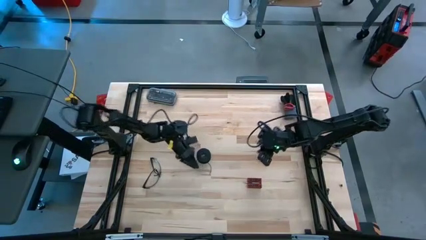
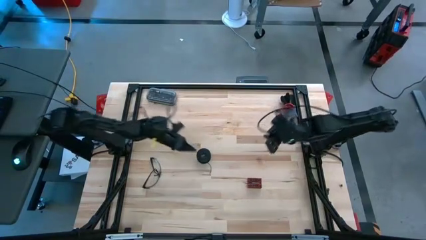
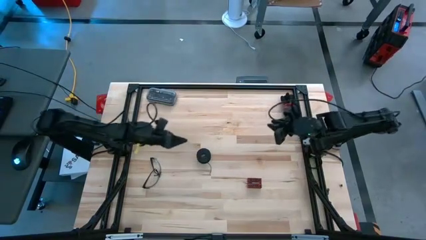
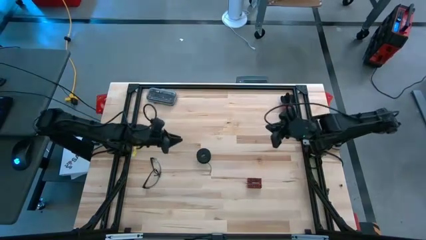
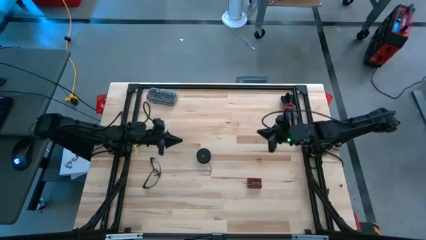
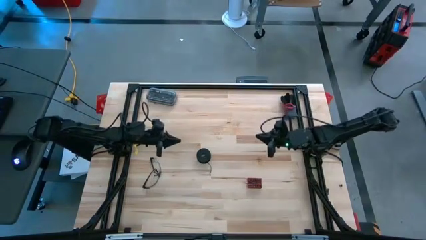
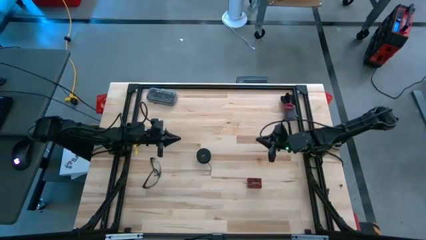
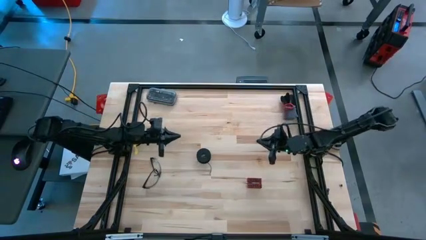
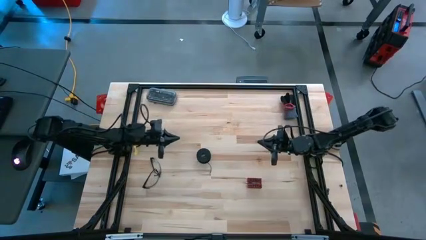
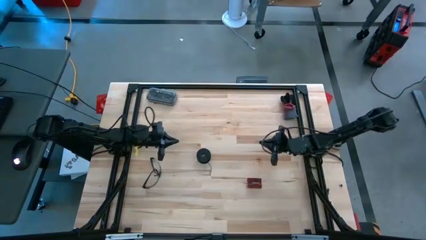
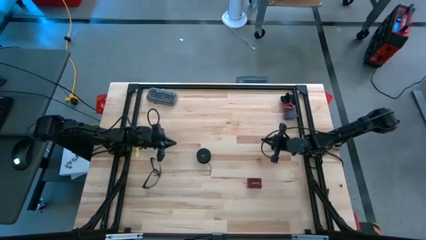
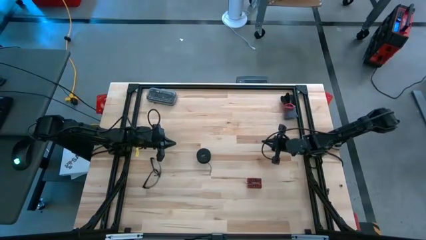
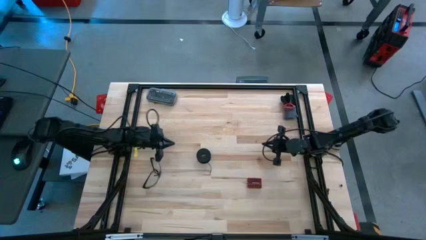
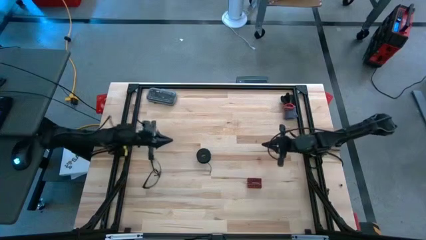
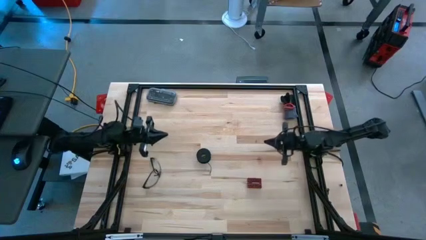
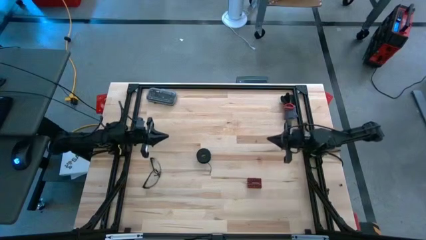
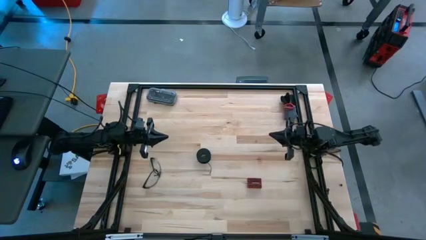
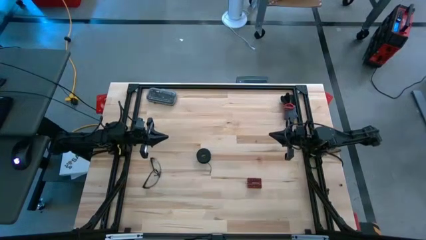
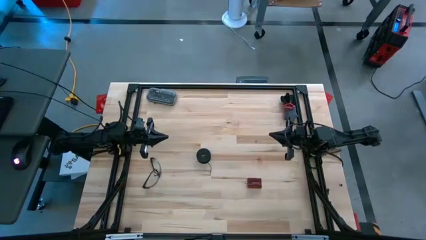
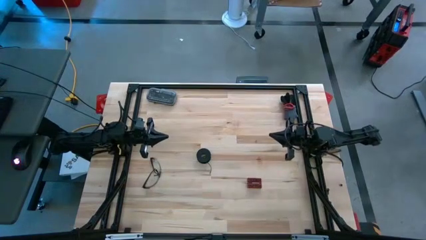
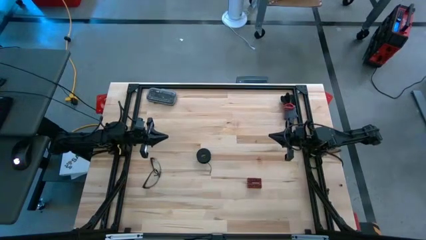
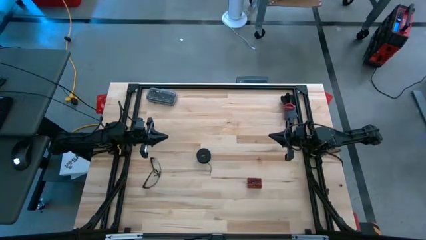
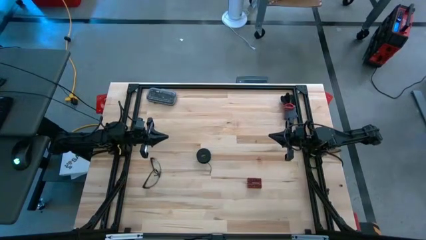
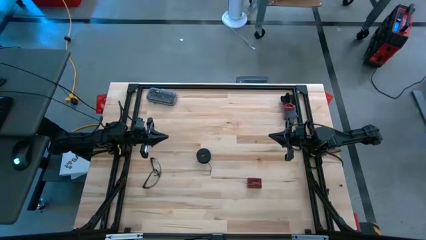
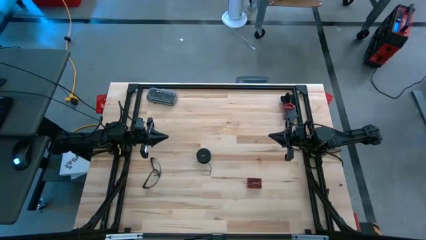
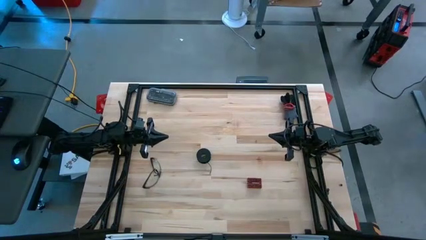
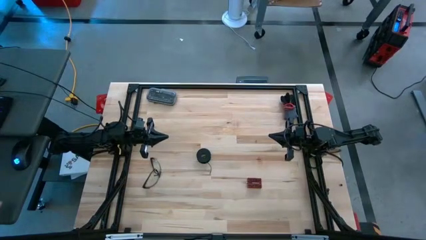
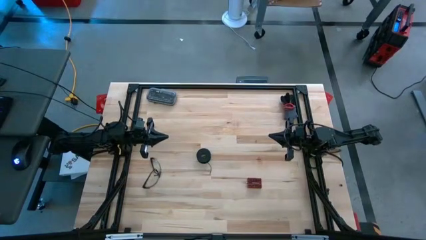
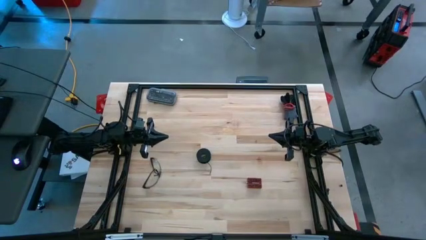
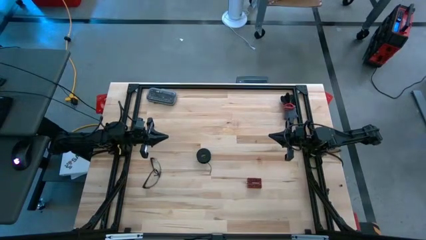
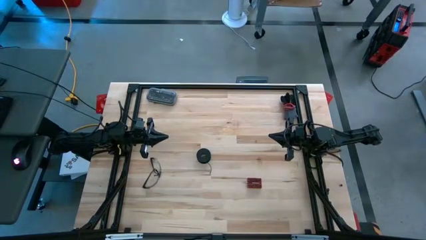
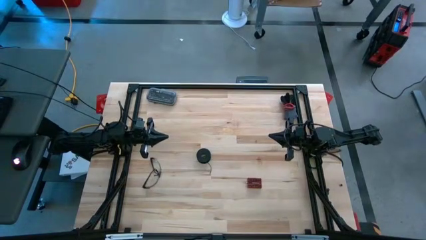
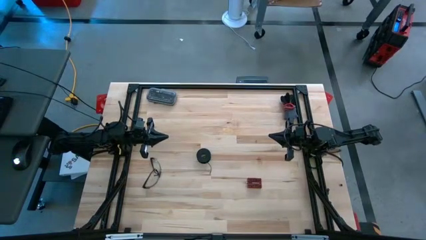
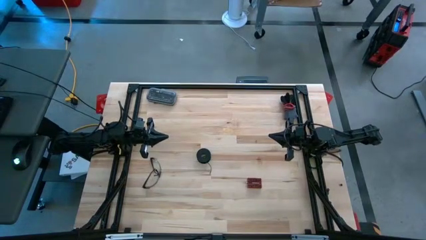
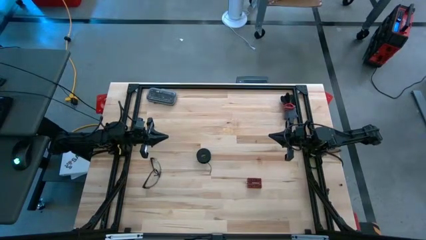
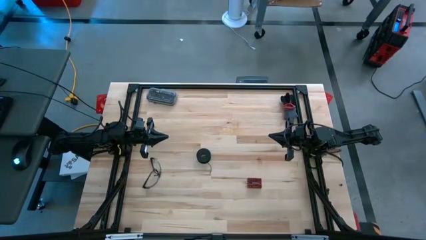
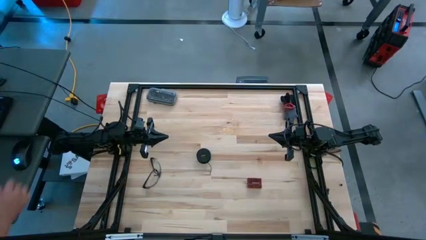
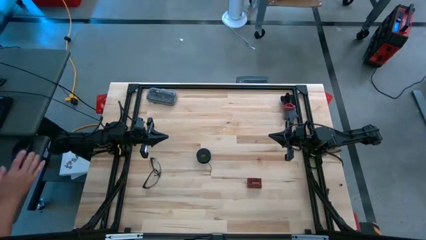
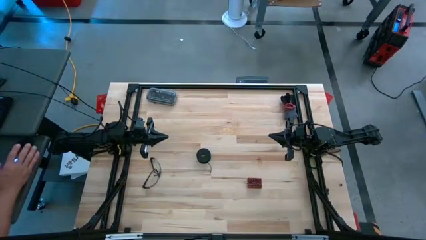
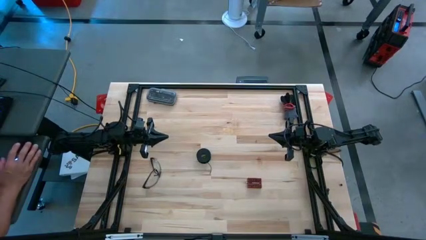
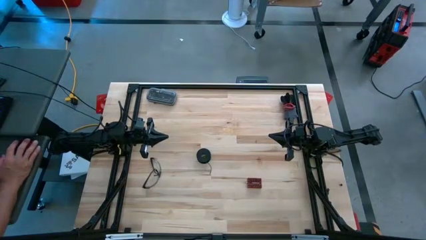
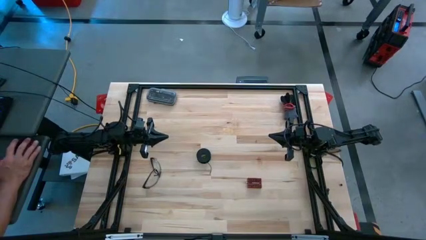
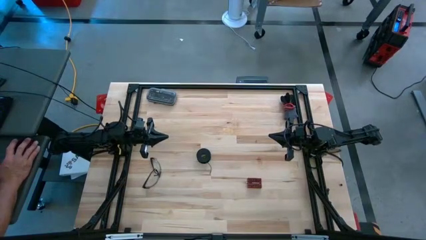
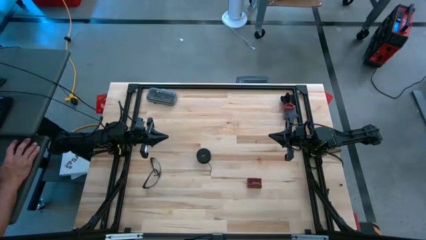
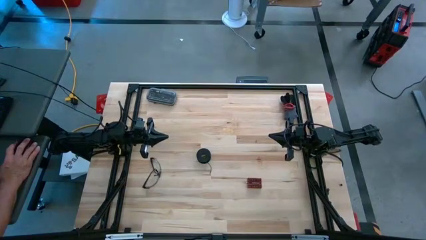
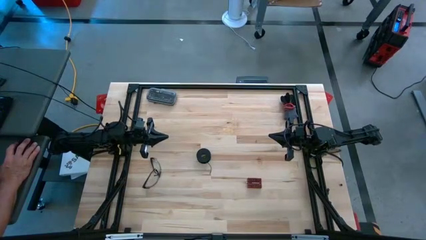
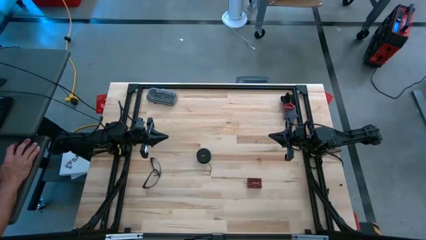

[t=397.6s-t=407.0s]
Task: Coil cords
Return to Home Position

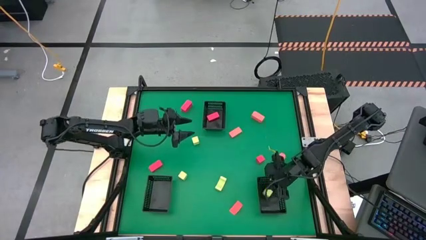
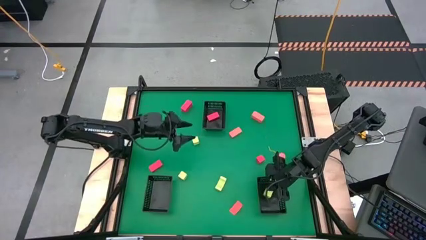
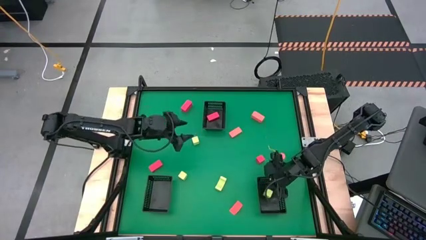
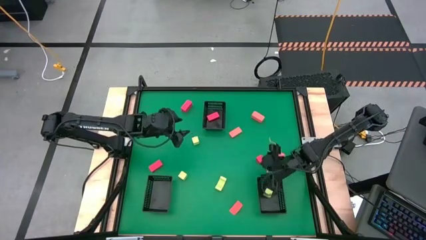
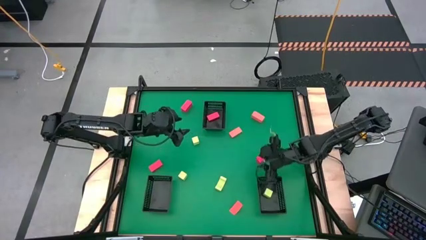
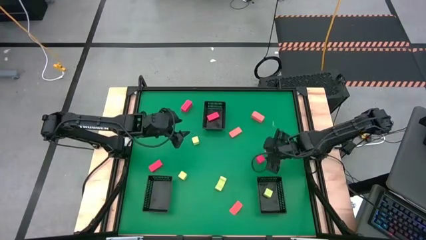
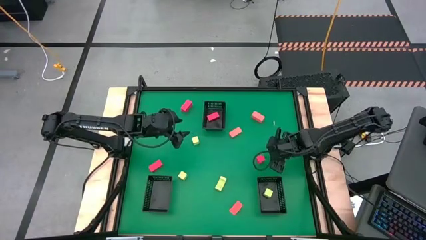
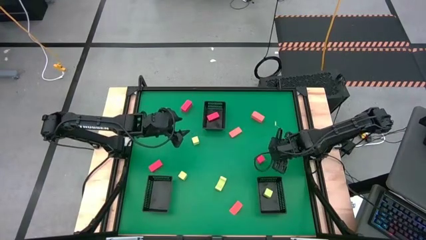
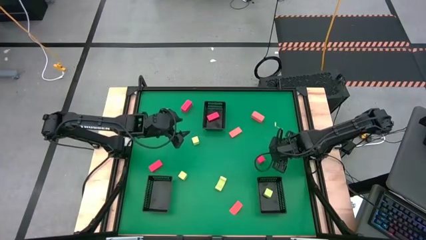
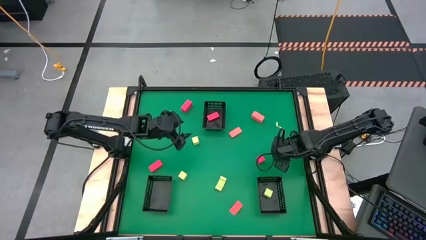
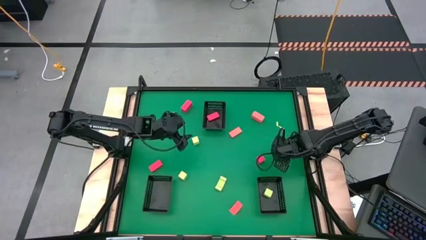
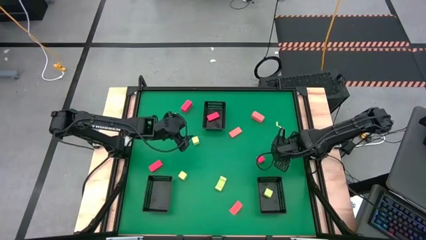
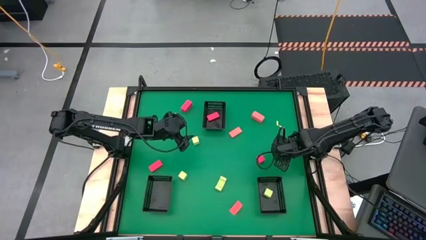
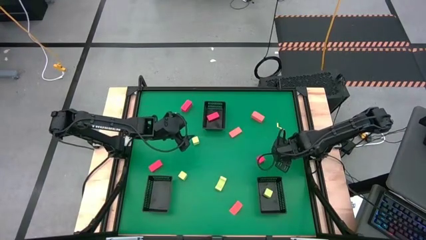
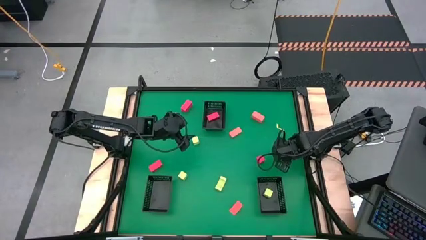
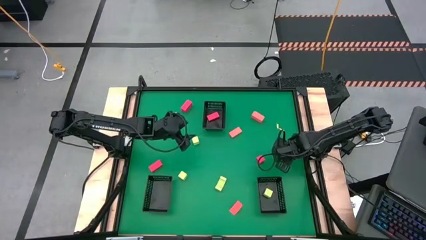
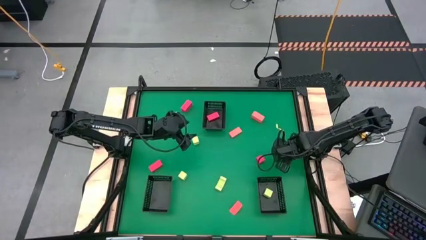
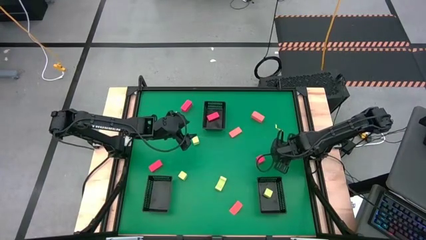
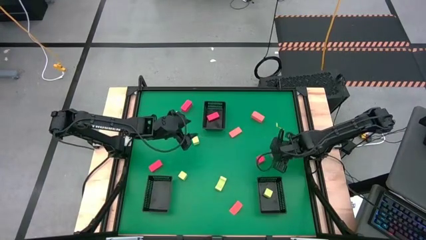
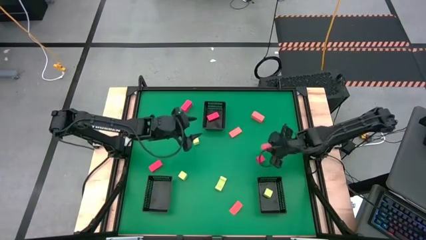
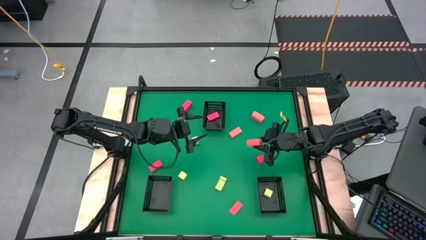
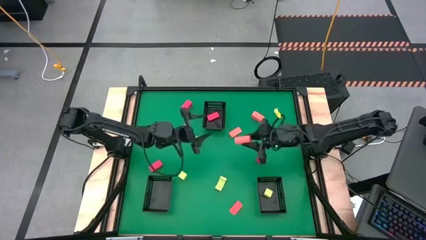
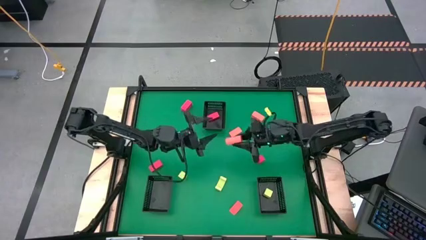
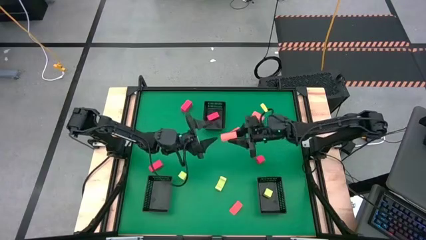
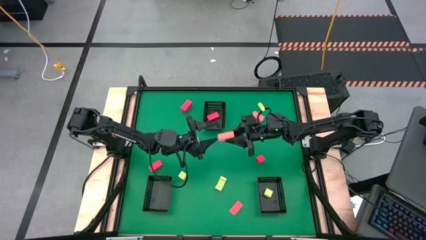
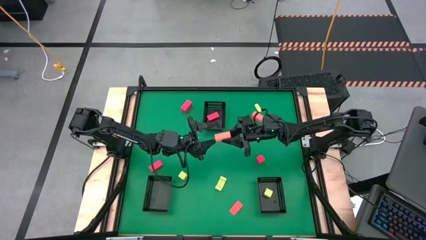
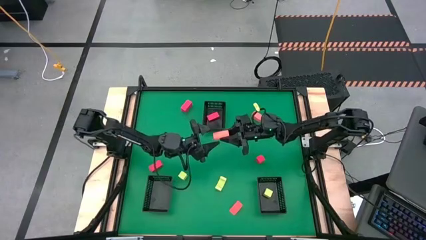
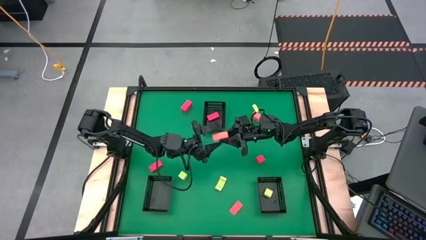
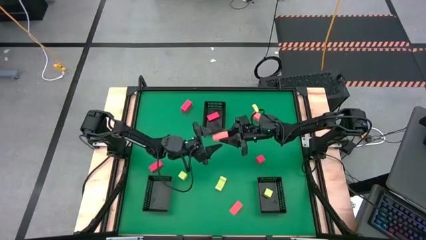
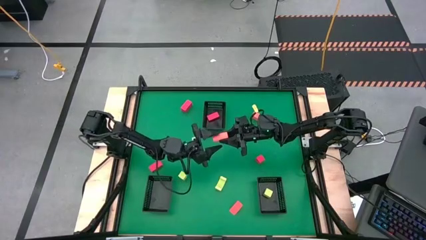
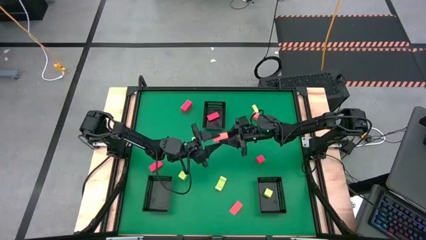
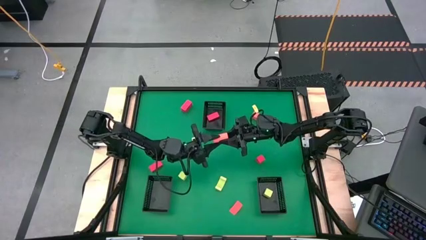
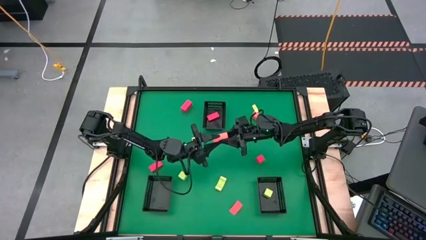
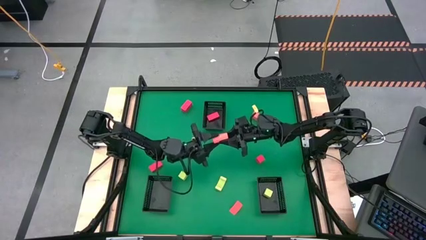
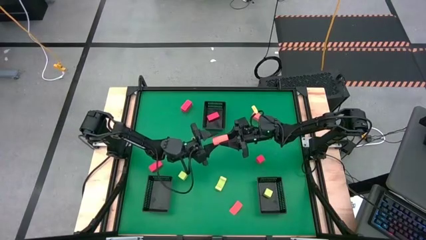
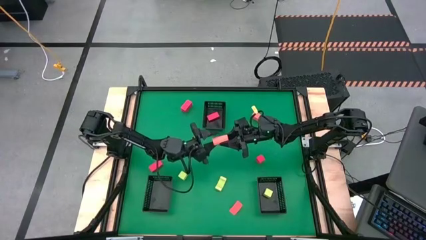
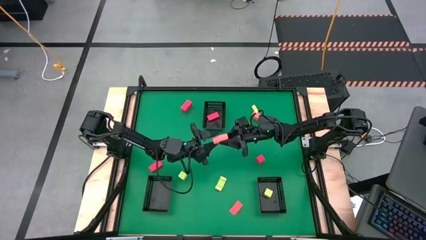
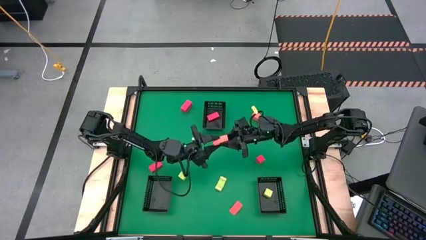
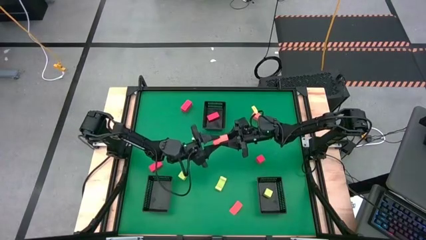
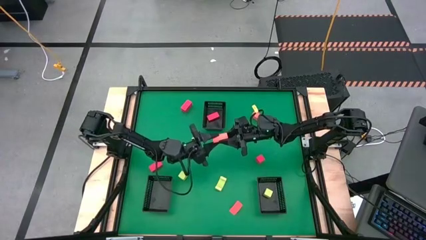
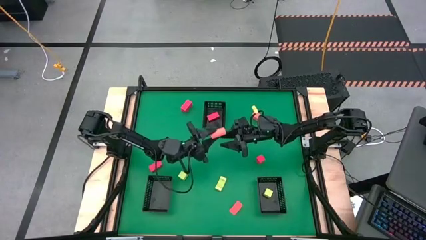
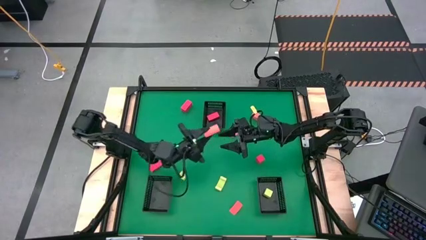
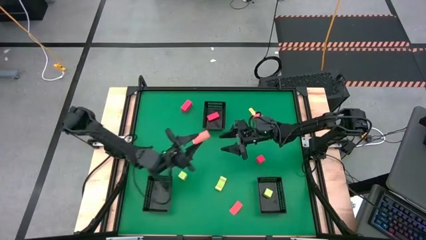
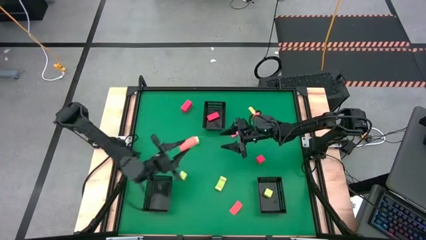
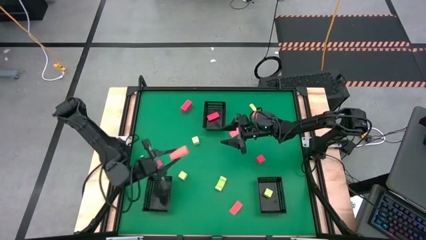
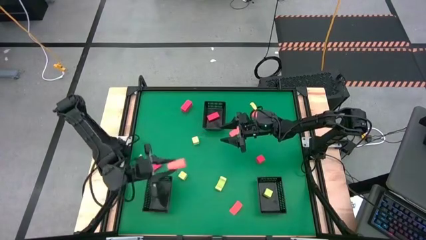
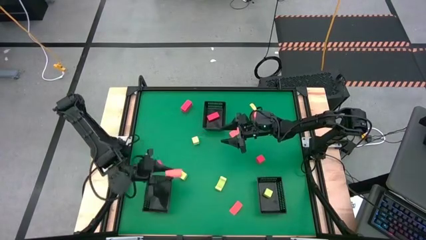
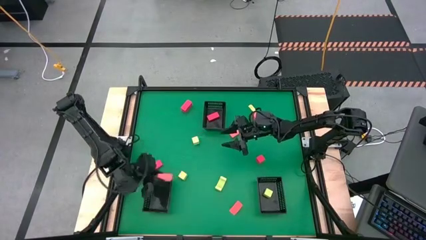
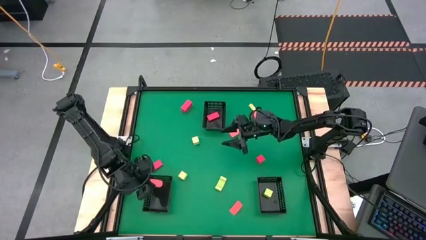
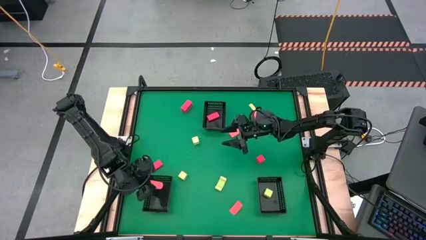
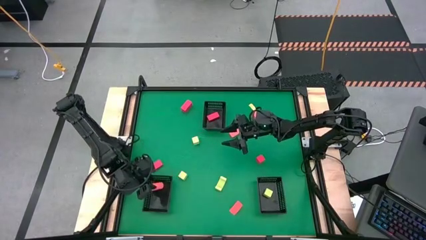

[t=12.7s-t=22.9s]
Task: Sort & place blocks by color
Put the orange block into the bottom left black bin
